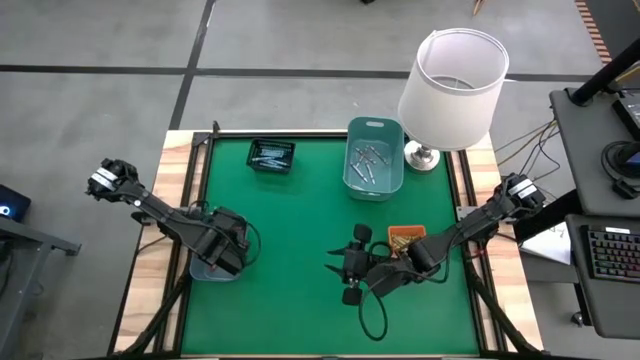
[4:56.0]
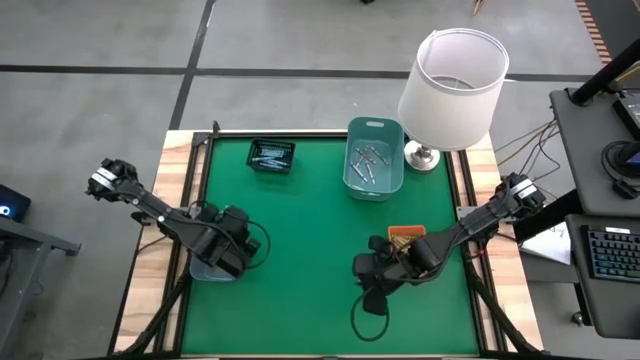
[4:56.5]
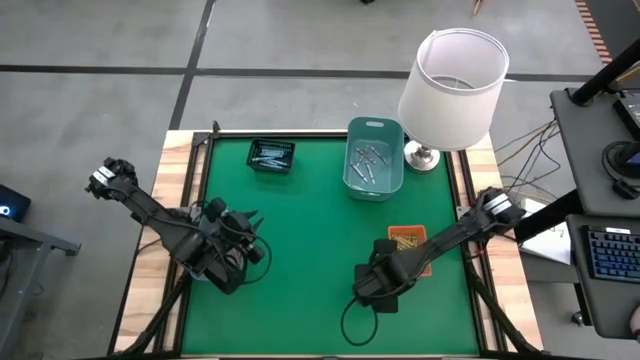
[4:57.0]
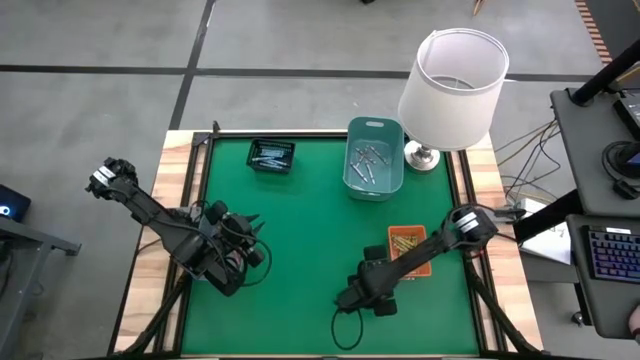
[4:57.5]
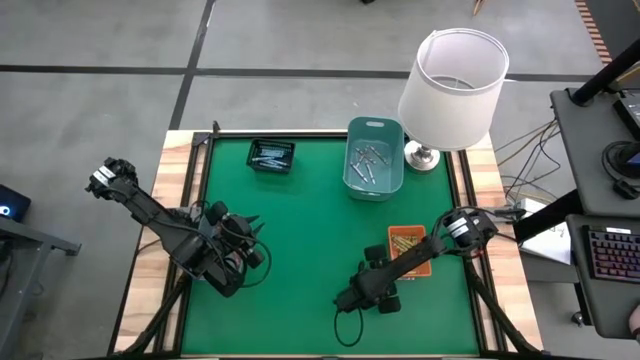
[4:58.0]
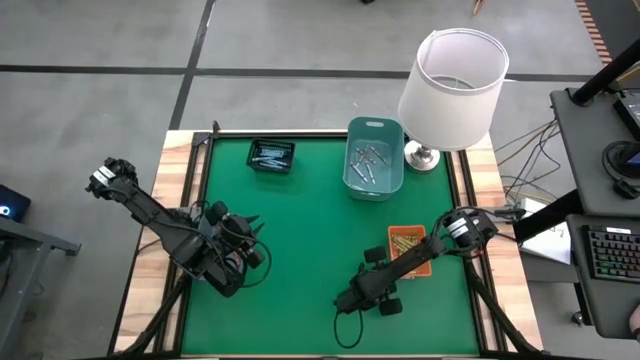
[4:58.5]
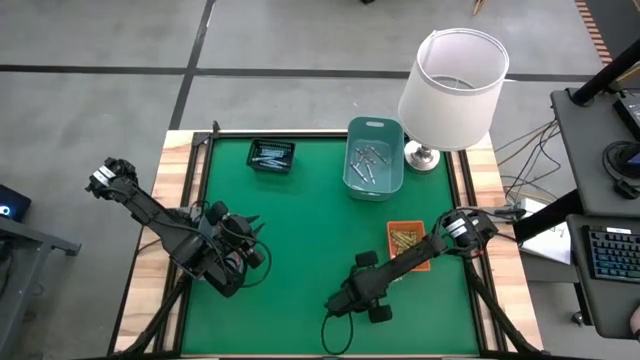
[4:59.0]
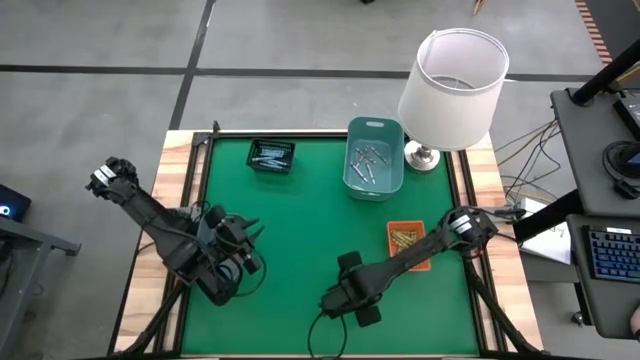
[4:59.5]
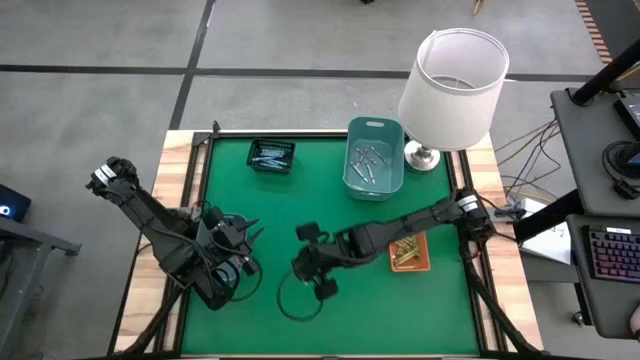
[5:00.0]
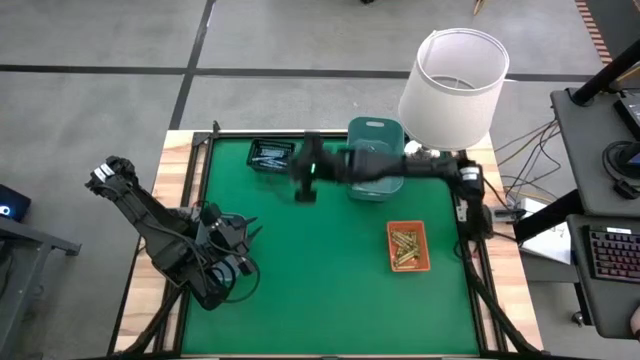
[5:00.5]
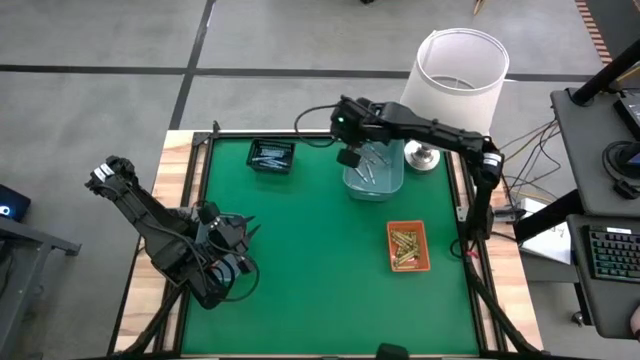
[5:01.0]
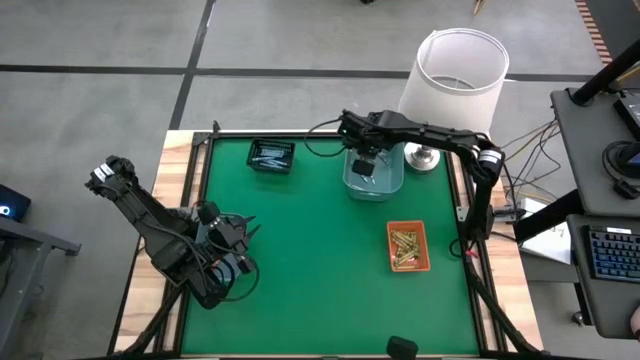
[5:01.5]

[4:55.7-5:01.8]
Task: Sort crayons
Put the white crayon into the green bin

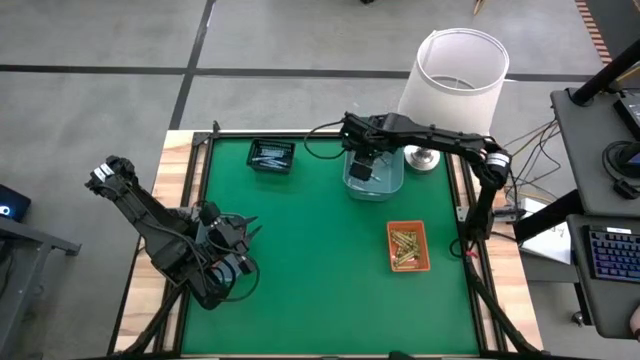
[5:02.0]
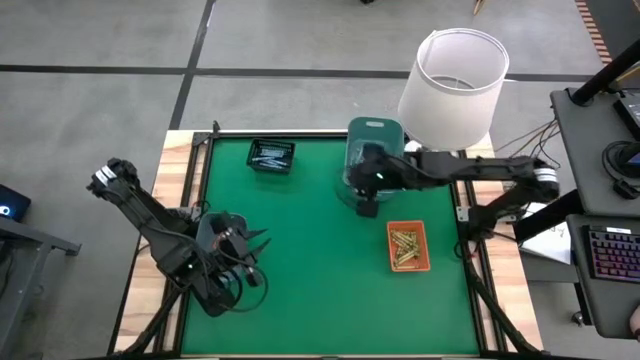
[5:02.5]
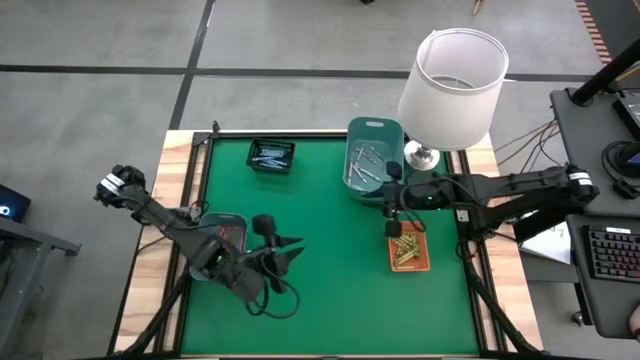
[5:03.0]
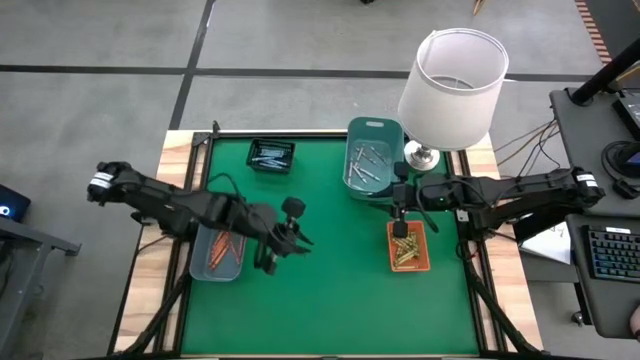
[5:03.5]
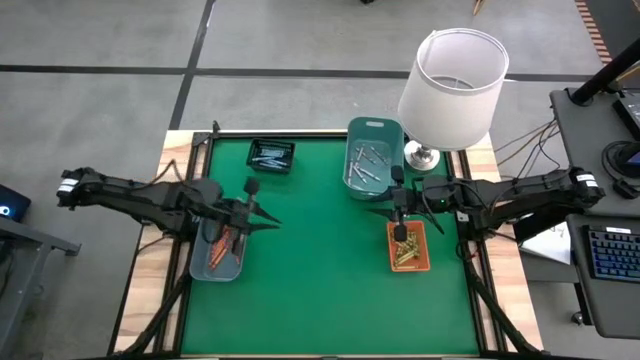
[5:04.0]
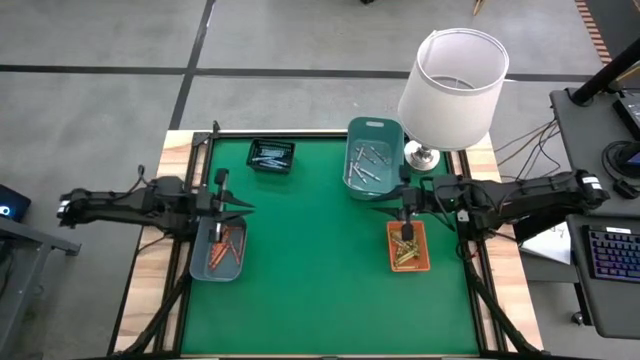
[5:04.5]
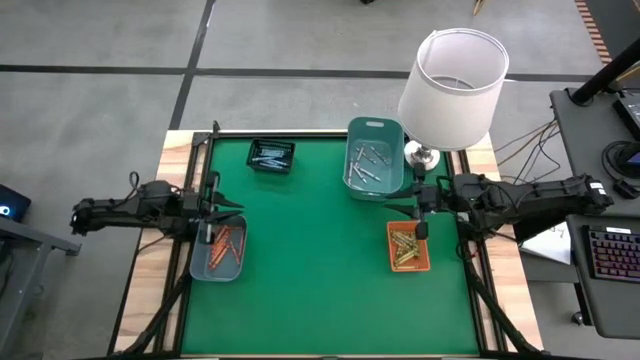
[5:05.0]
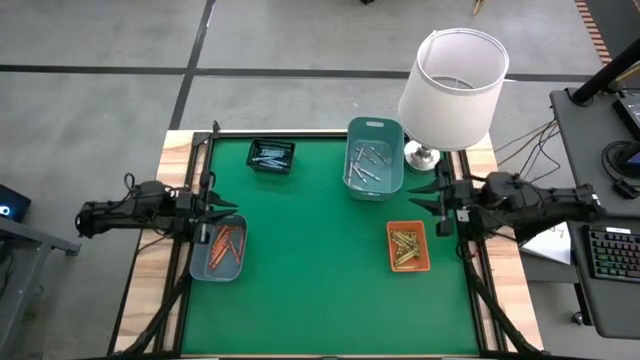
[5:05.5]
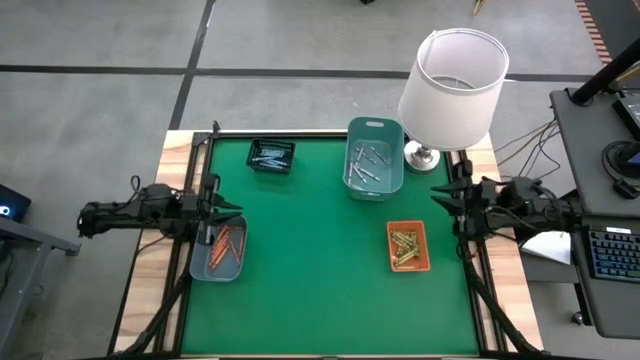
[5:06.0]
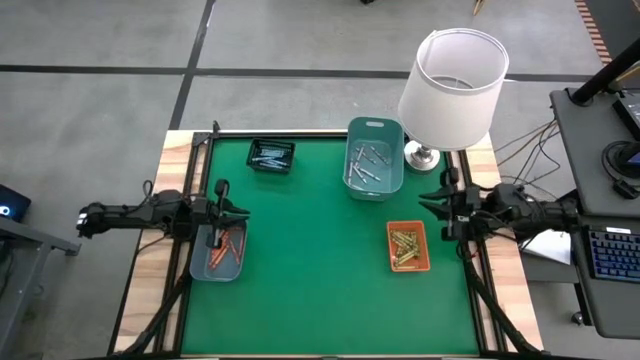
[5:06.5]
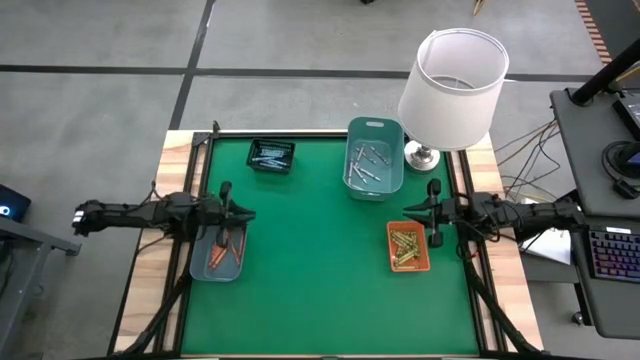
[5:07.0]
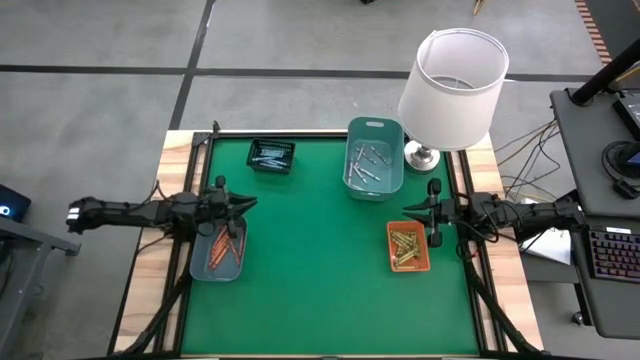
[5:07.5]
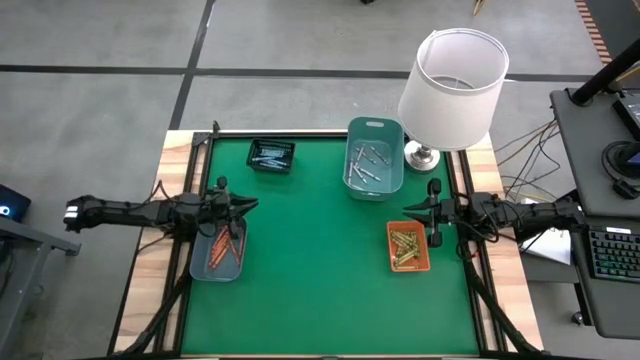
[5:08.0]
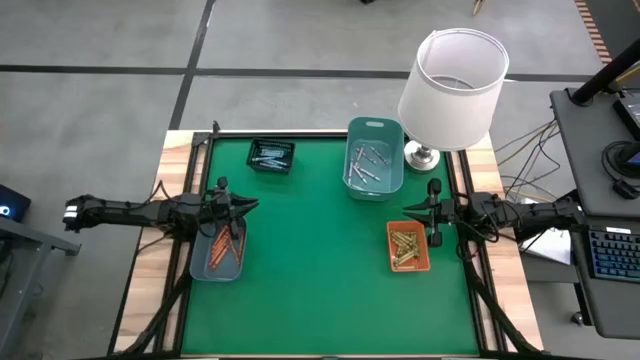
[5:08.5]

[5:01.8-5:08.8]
Return to Home Position

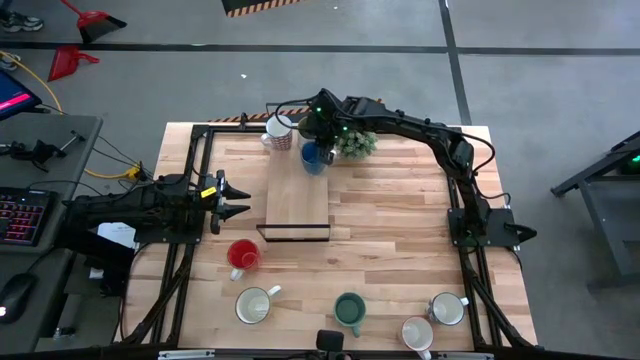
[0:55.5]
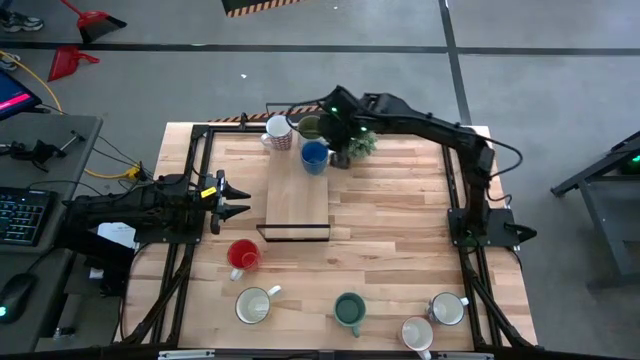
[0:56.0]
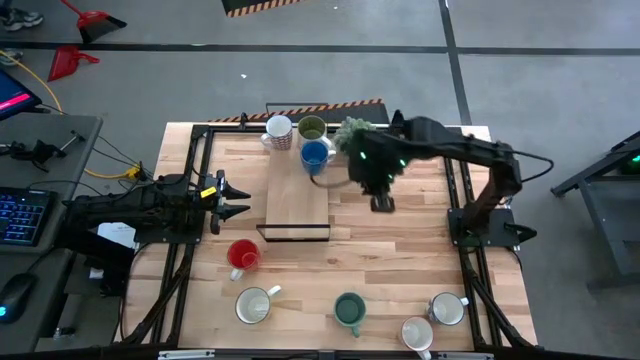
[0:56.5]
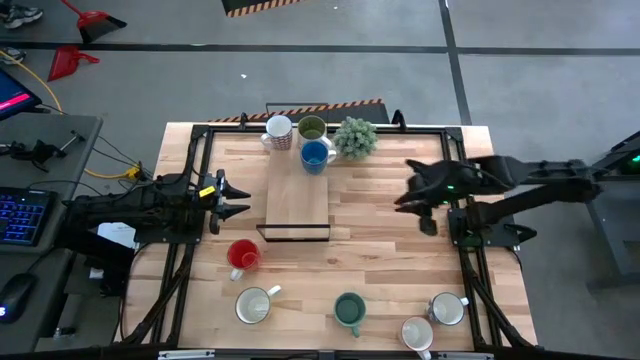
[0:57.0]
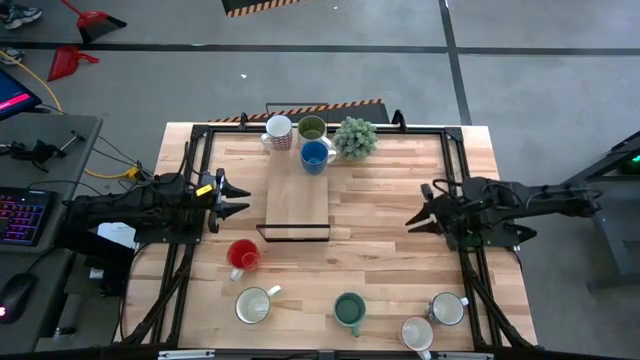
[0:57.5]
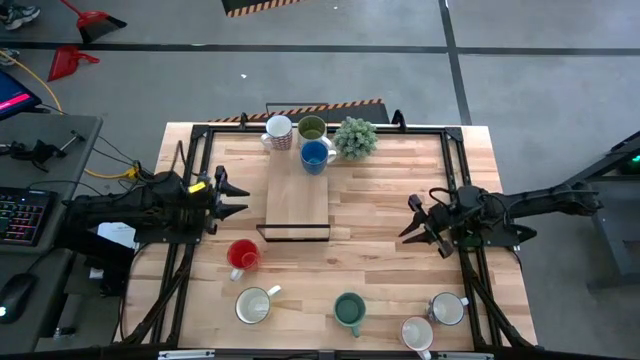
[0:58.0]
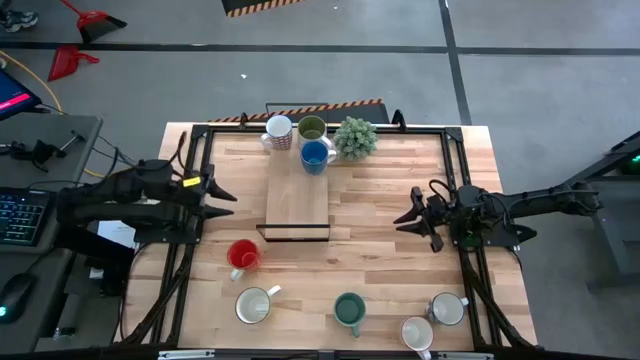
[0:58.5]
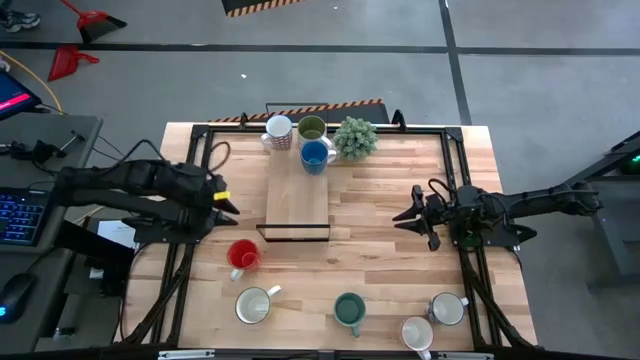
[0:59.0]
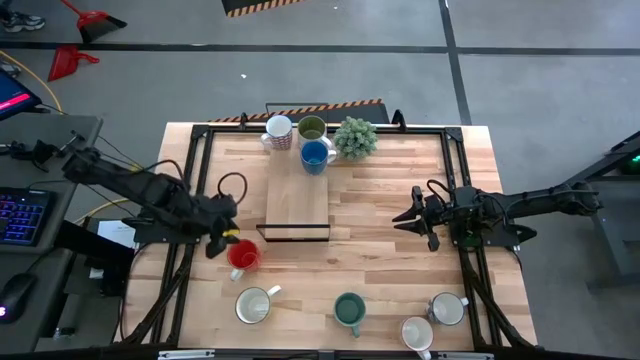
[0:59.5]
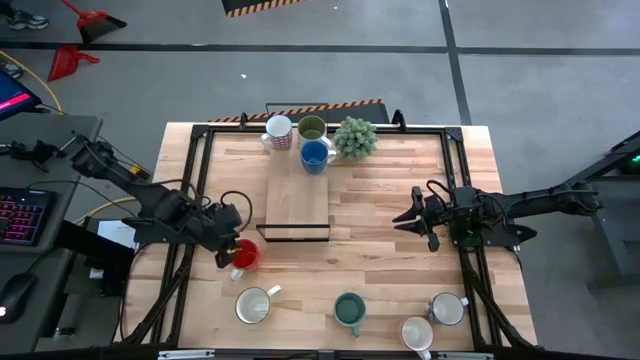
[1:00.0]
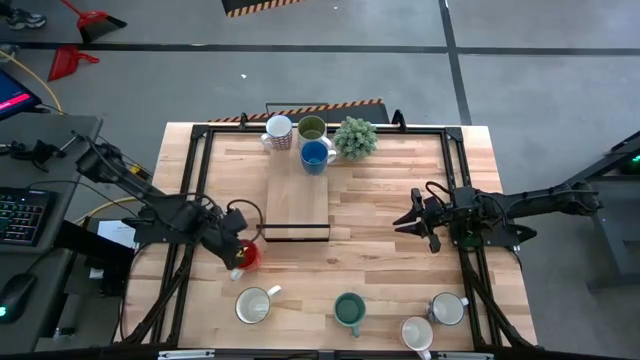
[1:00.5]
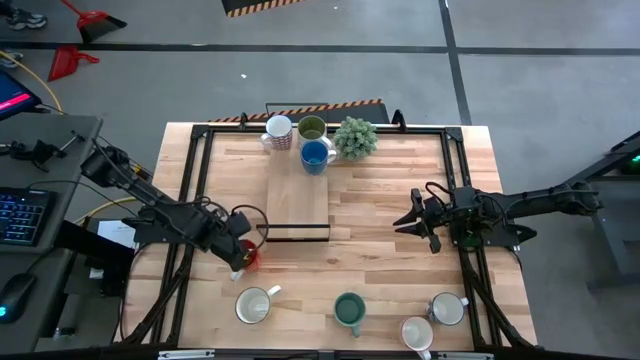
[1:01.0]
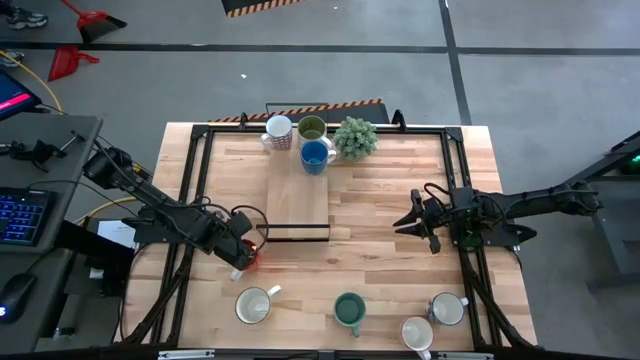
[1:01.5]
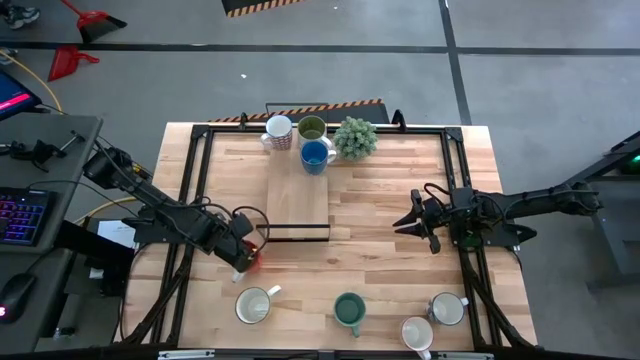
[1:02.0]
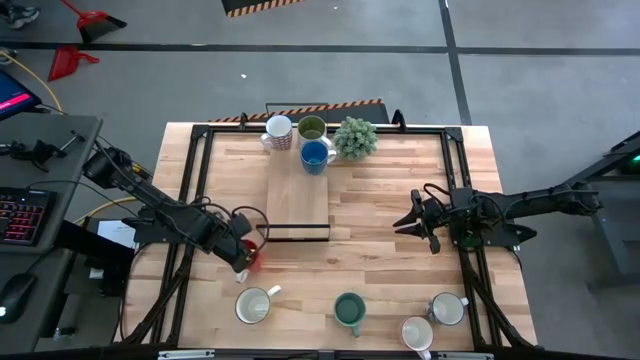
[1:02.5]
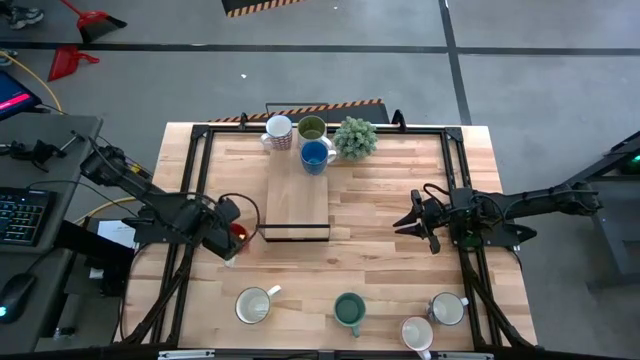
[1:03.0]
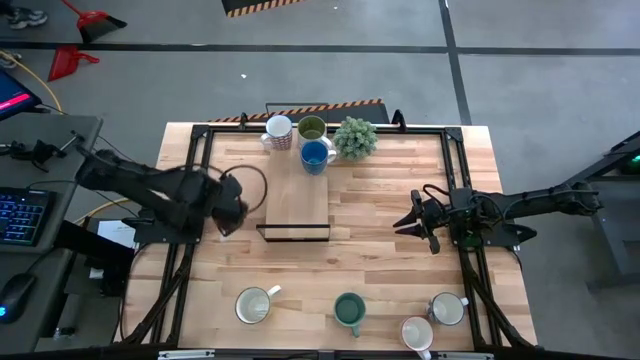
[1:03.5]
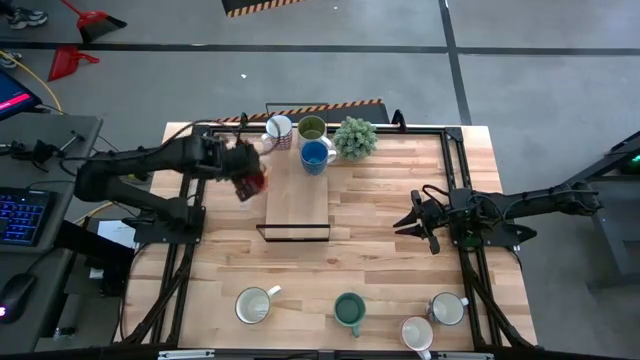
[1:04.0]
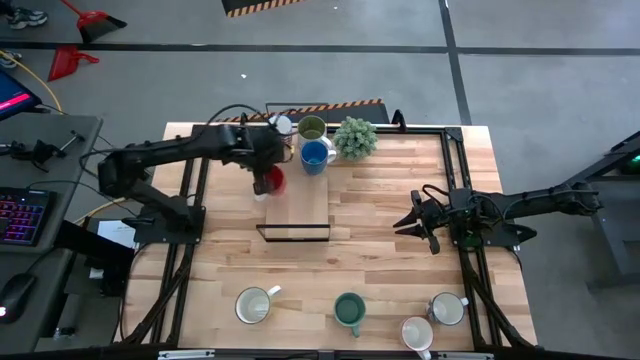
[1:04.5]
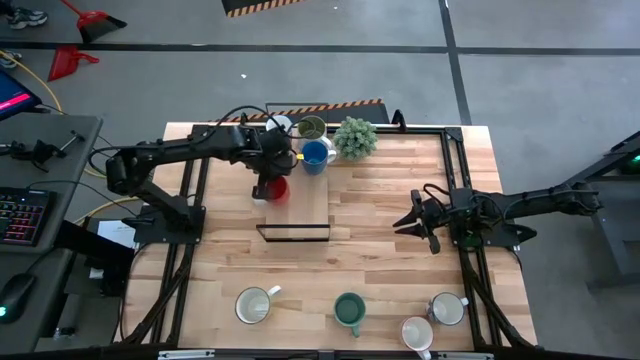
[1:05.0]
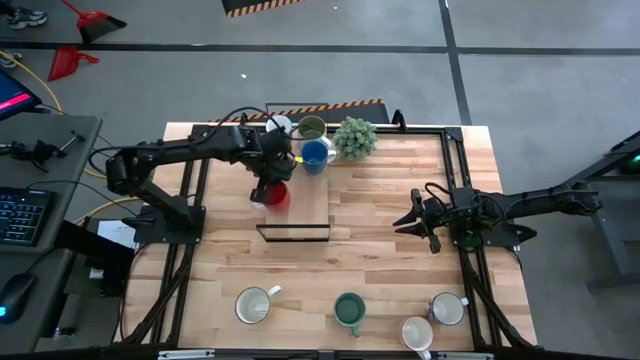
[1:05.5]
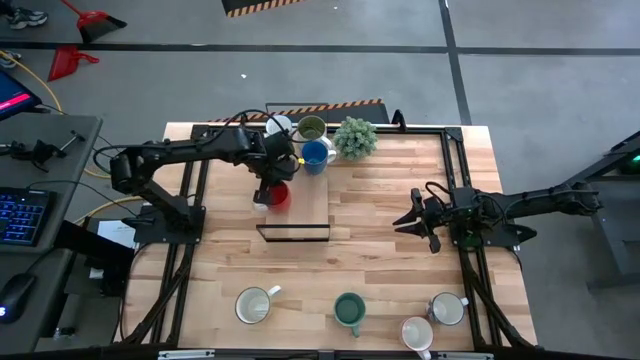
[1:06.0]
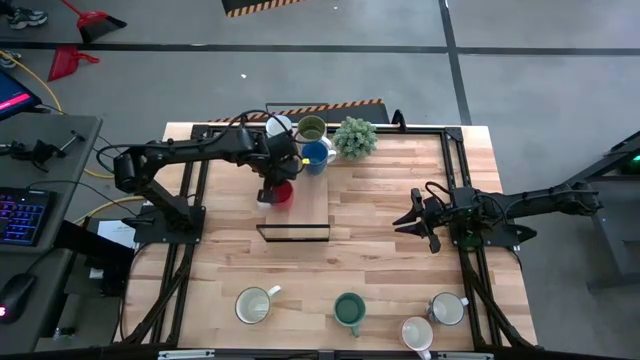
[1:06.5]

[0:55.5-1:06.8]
Task: Place coffee mugs
Put the red mug on the shelf
